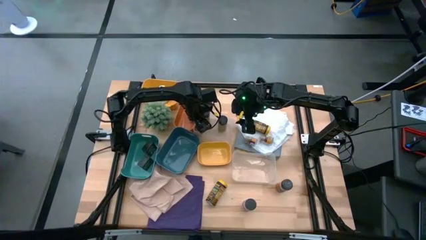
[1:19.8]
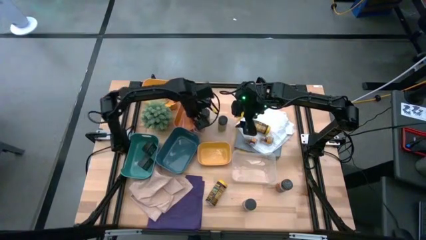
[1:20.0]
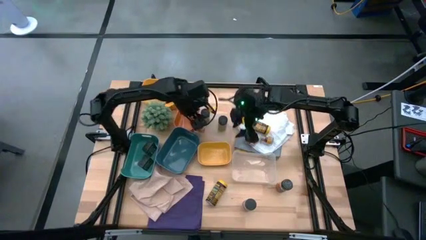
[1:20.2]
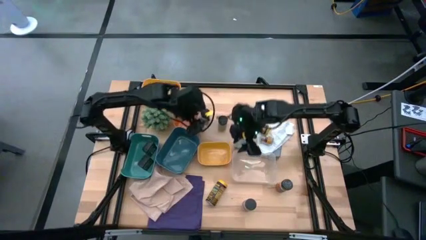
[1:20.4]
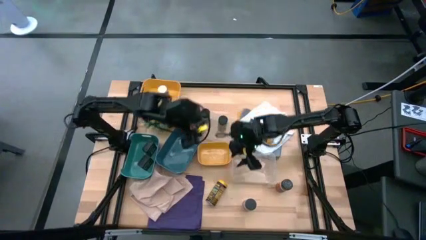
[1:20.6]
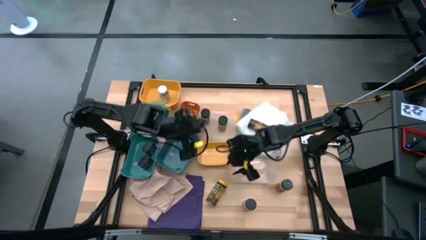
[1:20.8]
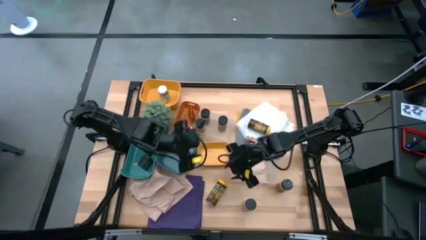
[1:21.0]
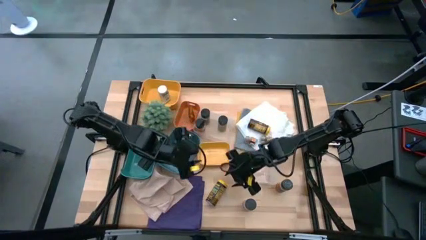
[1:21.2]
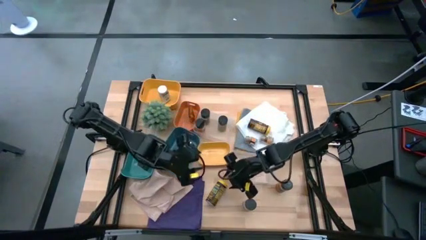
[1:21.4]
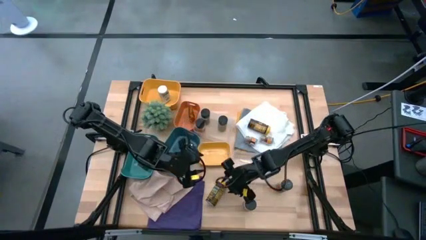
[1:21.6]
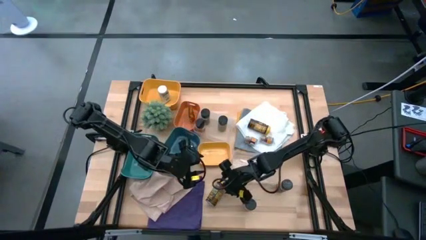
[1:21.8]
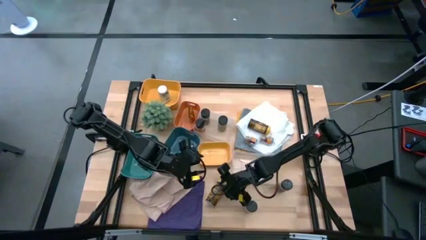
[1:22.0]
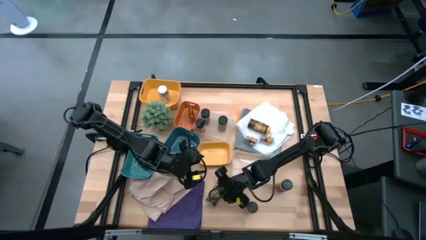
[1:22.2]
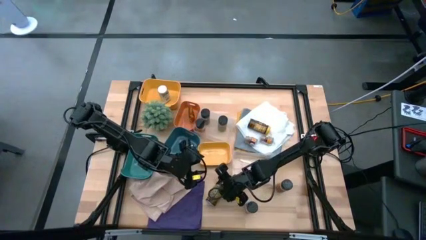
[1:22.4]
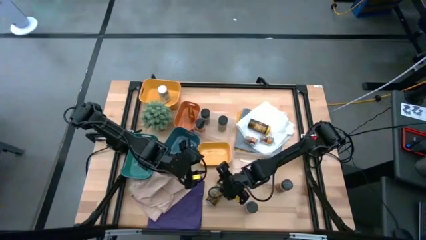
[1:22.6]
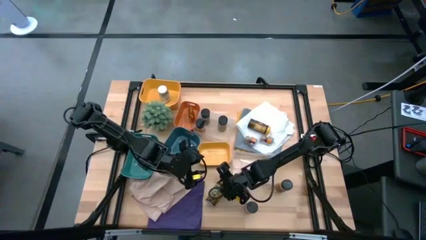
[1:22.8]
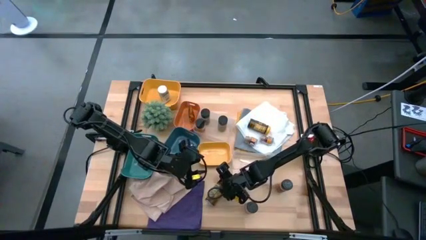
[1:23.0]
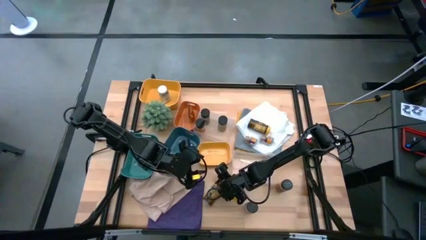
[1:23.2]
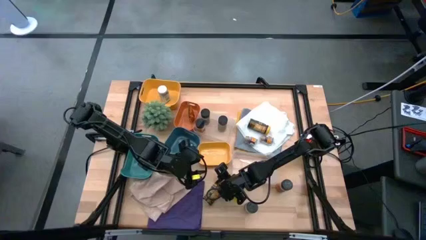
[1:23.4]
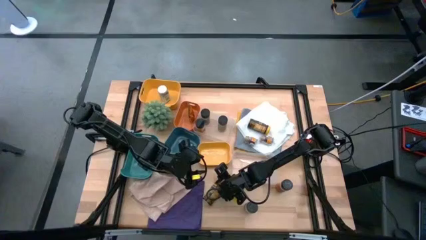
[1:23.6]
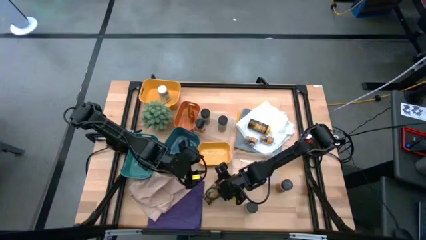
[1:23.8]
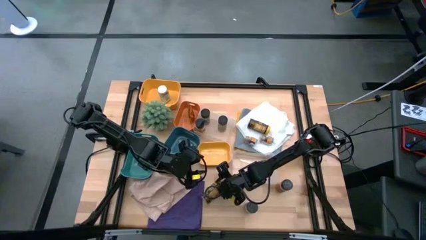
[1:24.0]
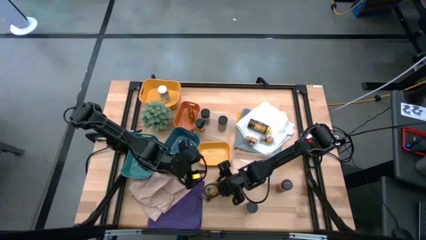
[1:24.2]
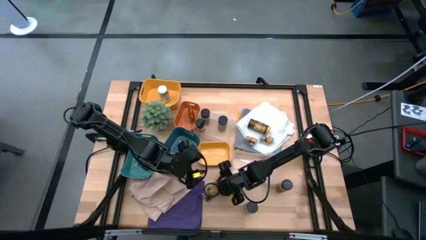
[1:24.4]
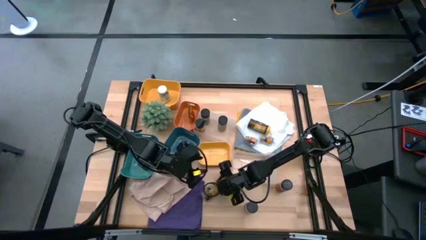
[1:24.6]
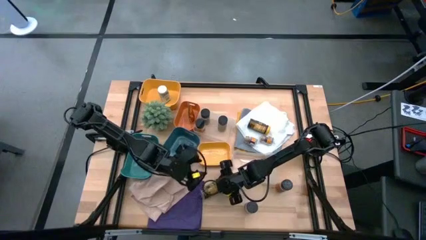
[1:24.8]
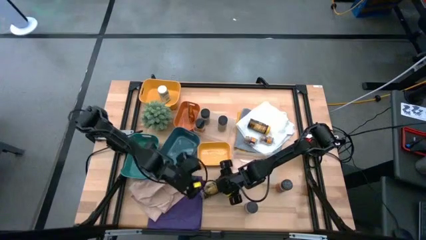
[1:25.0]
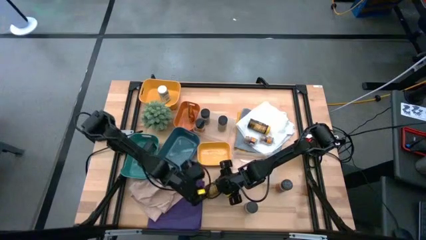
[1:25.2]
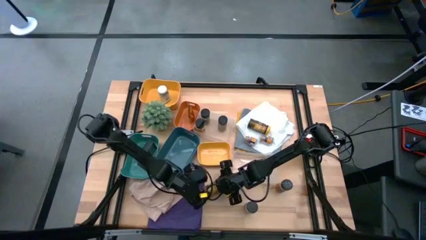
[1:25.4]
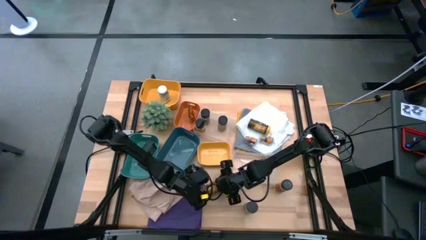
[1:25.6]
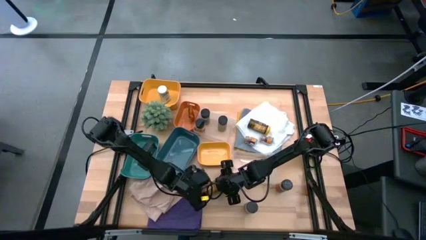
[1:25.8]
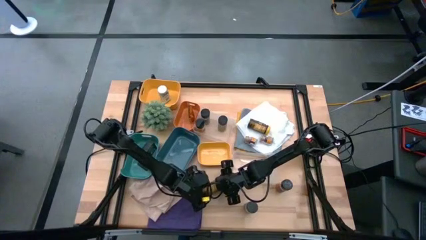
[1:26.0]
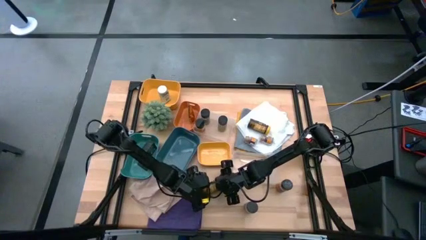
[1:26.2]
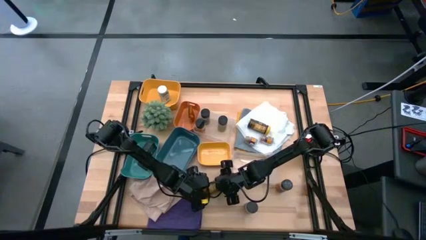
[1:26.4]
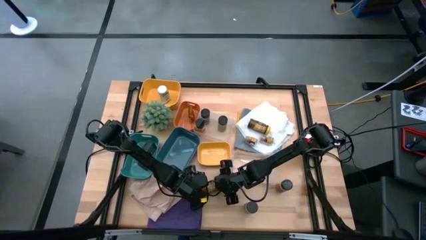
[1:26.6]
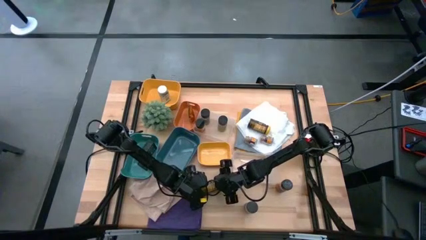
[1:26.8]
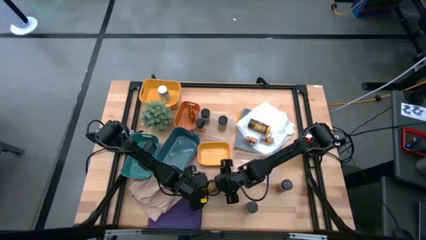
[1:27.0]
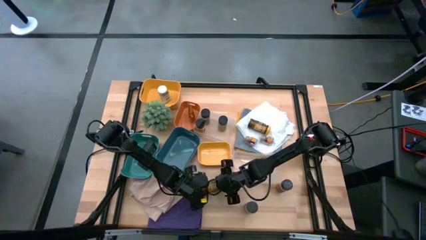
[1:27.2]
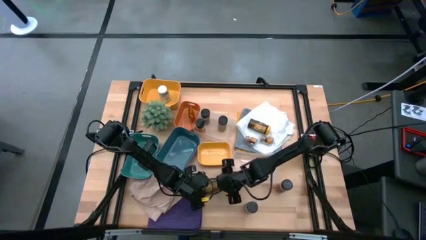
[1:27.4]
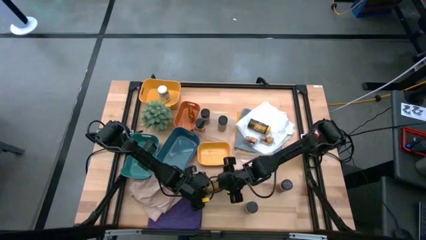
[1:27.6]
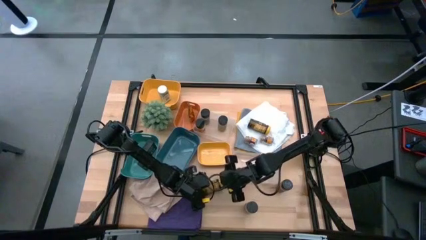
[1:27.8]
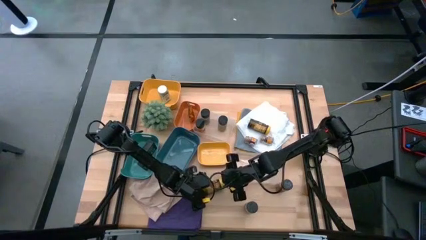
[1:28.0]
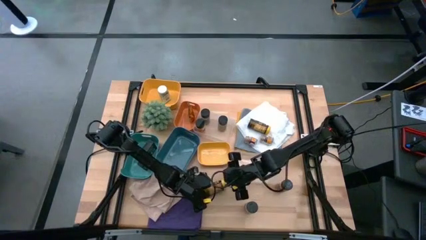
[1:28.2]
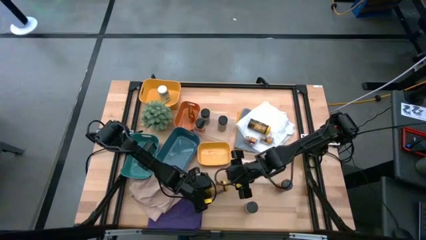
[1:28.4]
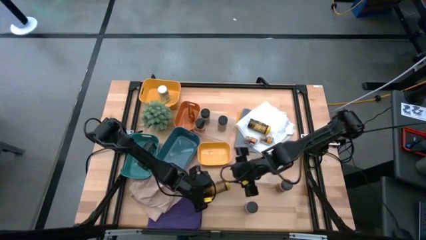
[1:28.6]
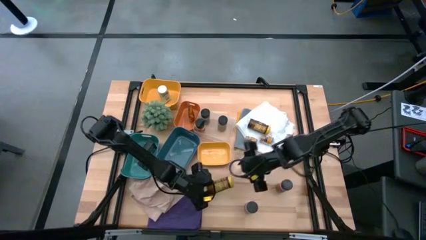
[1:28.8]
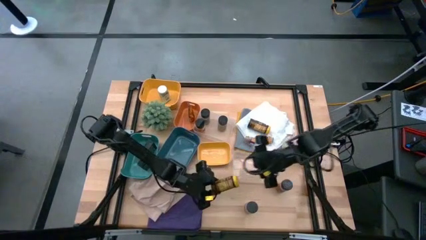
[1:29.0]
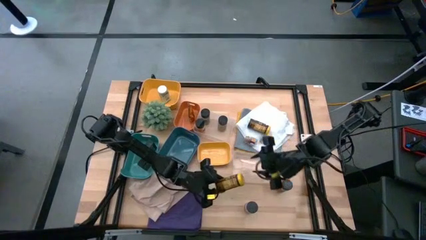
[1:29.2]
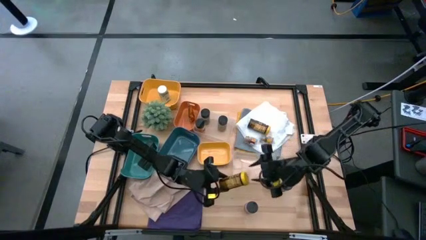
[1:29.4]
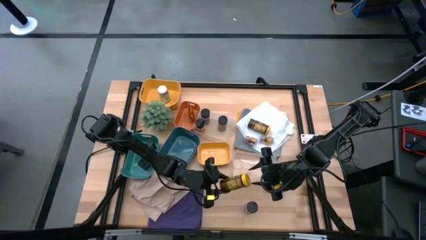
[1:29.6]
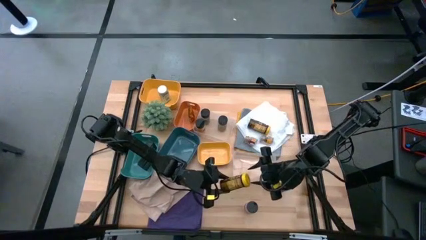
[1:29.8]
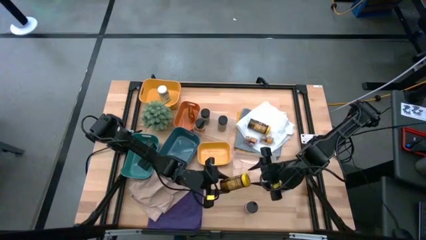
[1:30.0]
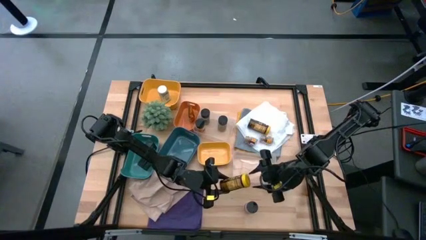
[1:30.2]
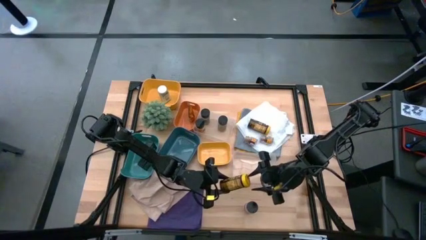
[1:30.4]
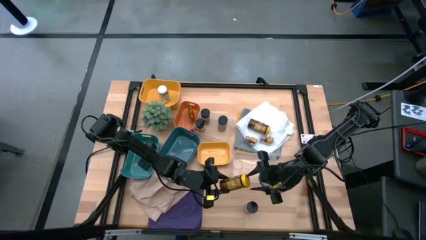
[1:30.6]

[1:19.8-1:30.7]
Task: Sort spices by type
Put the bottom yellow seasoning bottle into the bottom transparent bin

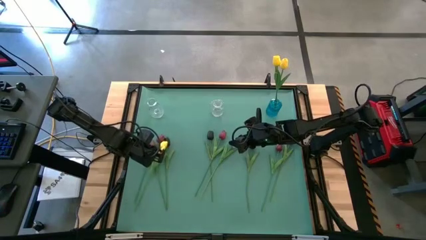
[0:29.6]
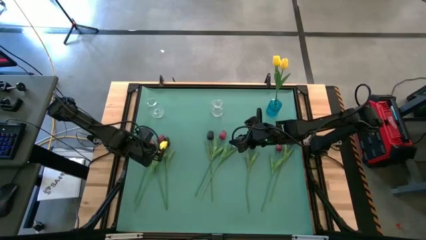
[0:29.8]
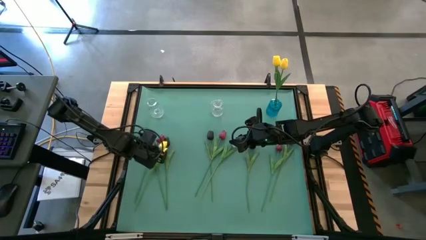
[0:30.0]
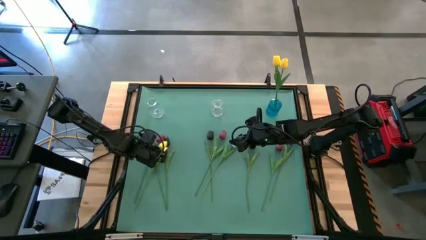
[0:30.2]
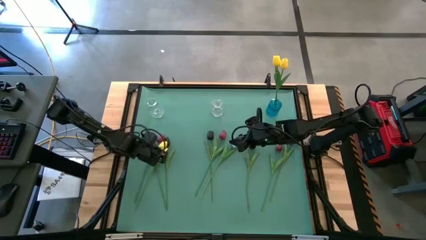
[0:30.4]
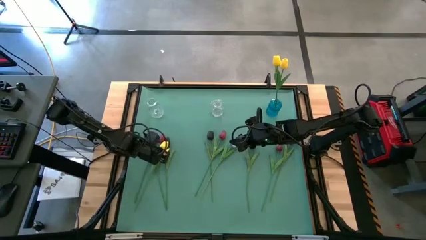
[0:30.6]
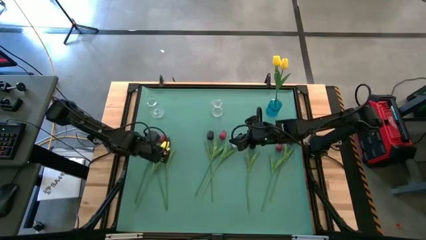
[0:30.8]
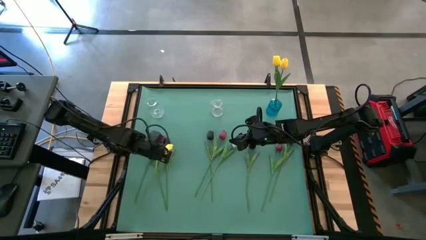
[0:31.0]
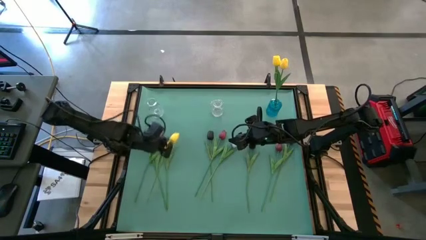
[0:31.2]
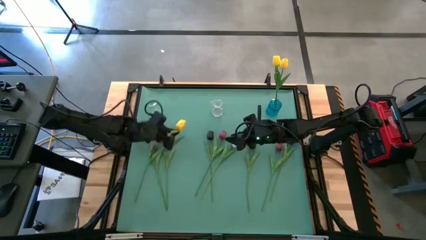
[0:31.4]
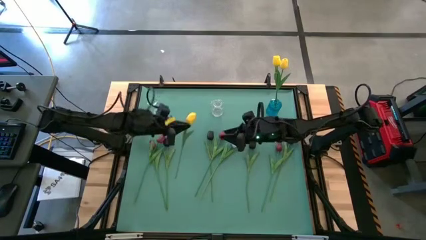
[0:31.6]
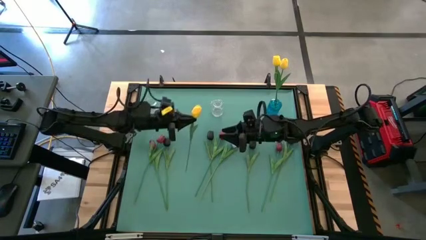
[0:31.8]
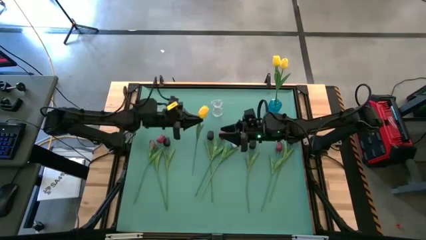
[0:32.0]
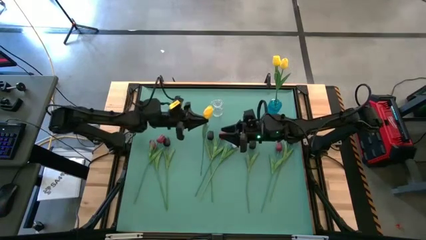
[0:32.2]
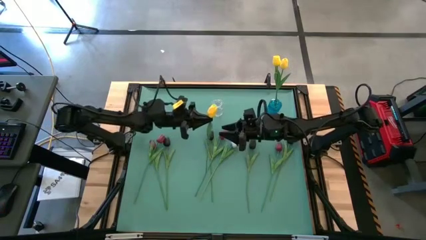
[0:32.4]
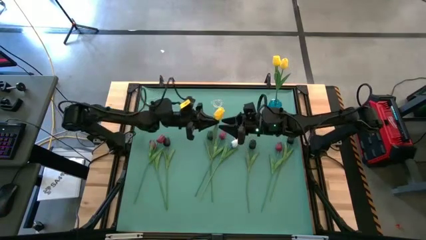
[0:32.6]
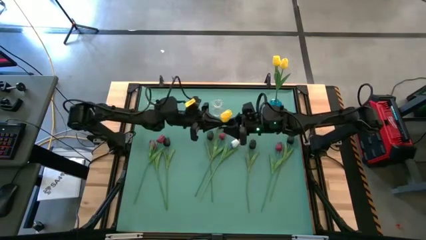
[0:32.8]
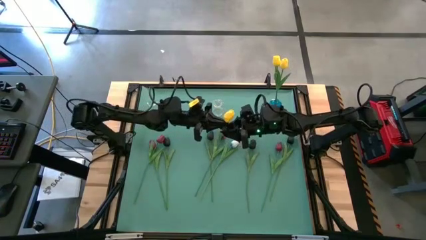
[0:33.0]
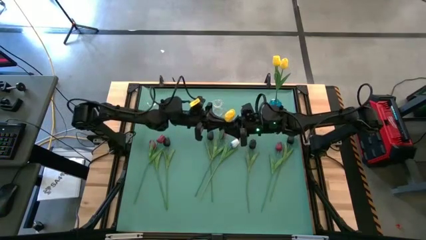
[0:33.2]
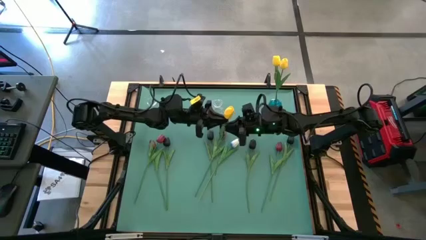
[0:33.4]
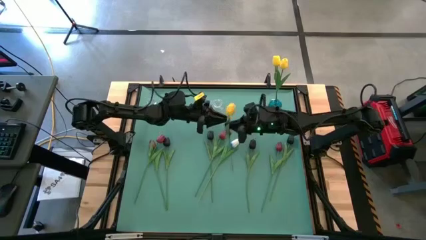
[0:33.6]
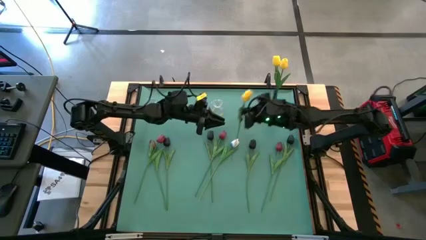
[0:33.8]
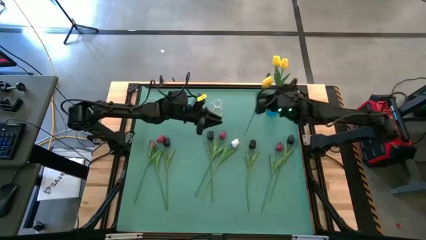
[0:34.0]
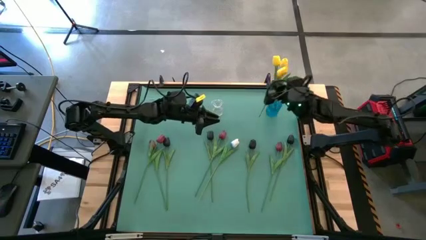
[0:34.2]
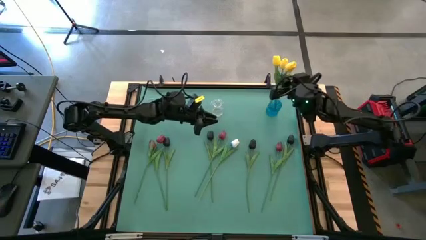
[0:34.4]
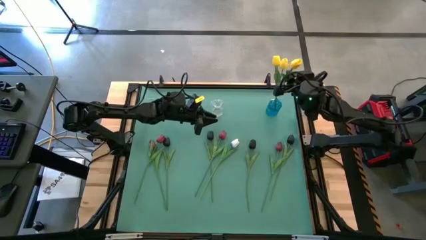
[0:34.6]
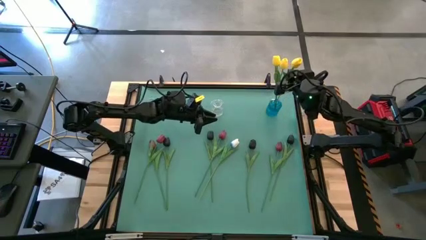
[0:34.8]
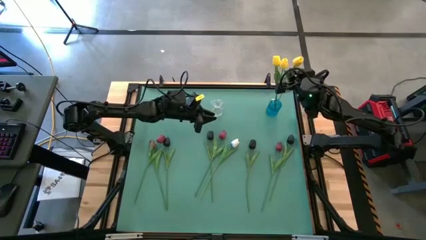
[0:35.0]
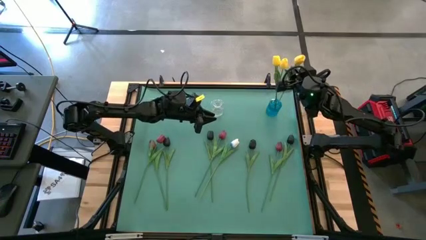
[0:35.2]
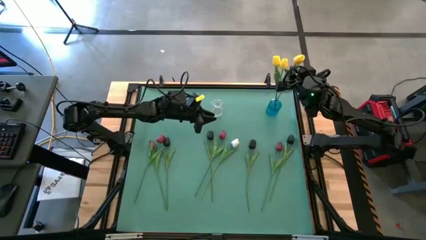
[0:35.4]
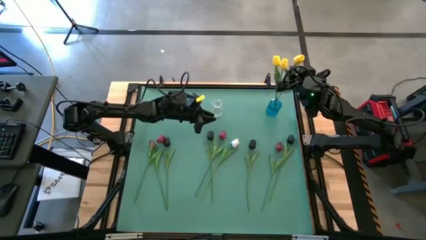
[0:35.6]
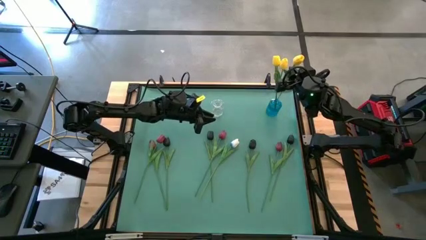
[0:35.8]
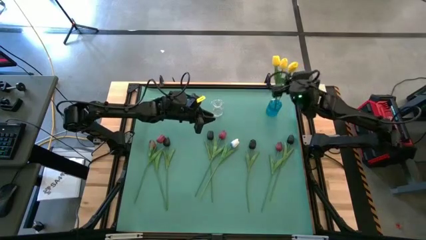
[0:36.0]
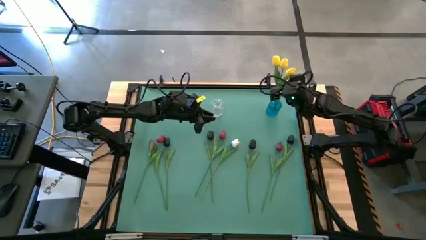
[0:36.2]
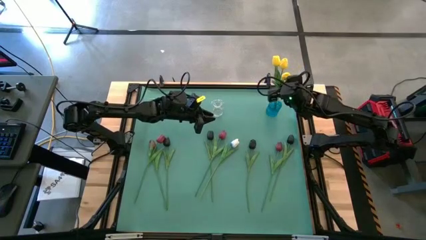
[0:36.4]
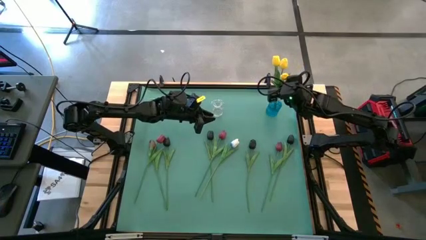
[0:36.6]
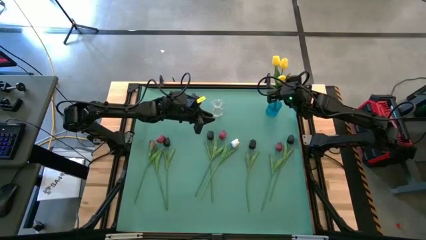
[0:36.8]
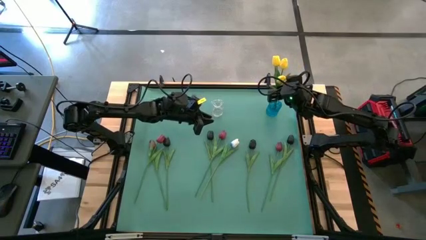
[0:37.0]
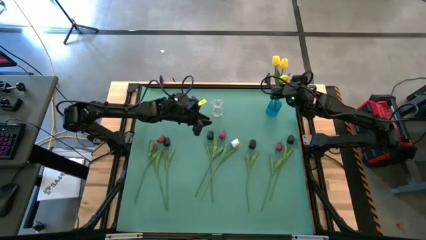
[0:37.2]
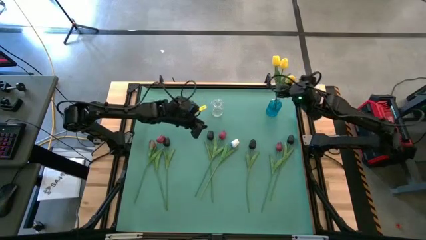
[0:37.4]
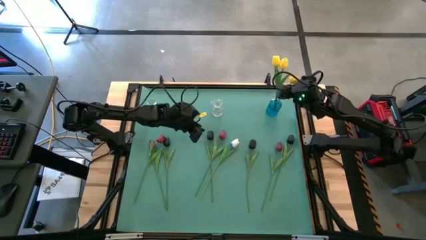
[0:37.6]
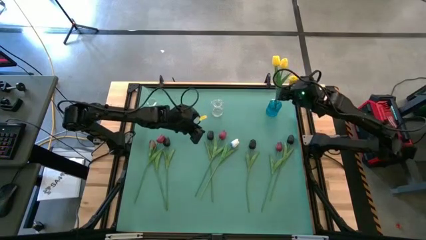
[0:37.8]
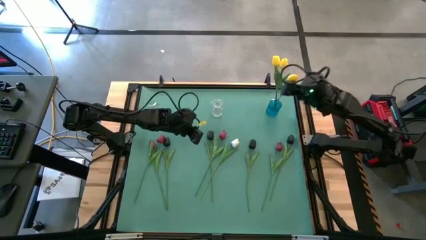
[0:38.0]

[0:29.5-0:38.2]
Task: Sort flowers into vase by color
Put the yellow tulip into the blue vase
